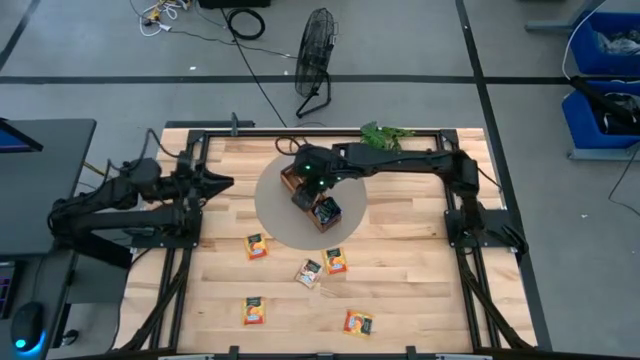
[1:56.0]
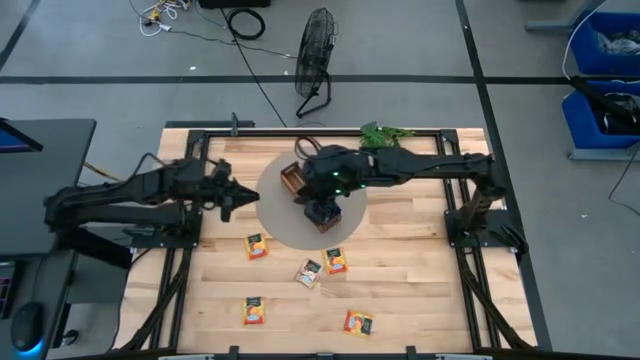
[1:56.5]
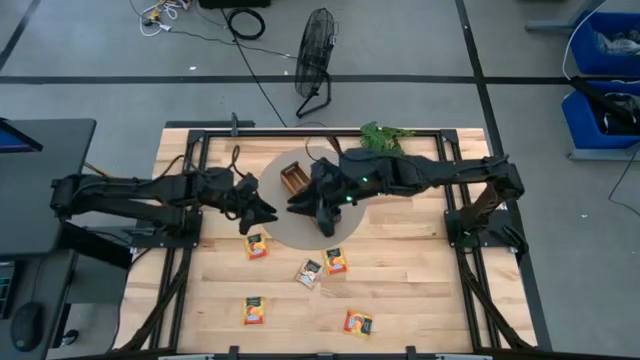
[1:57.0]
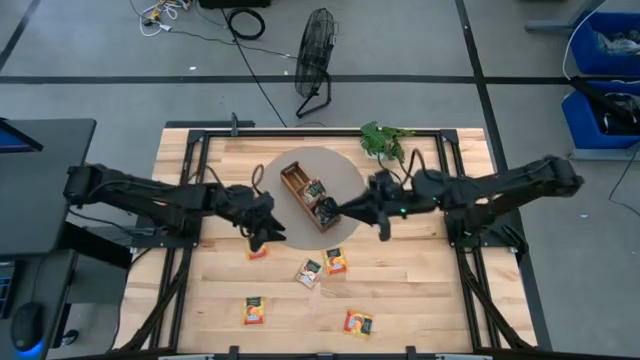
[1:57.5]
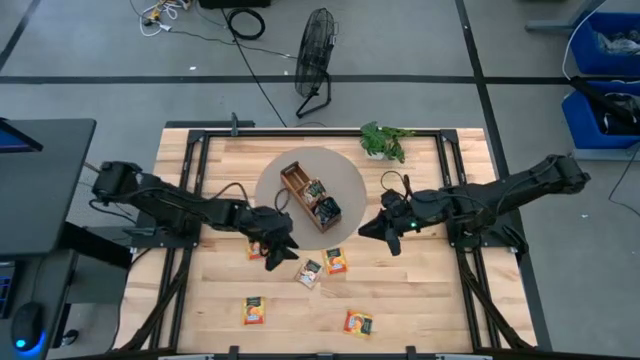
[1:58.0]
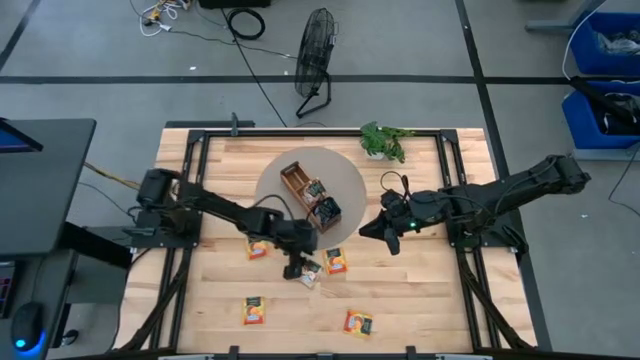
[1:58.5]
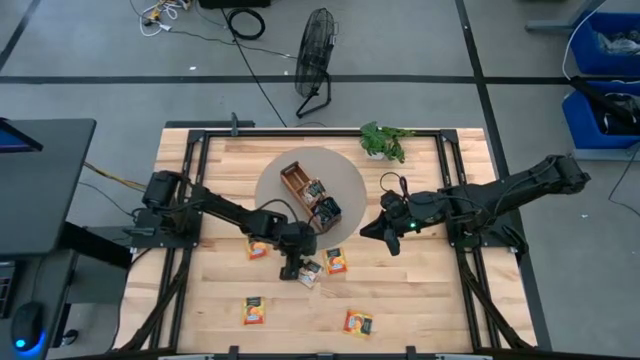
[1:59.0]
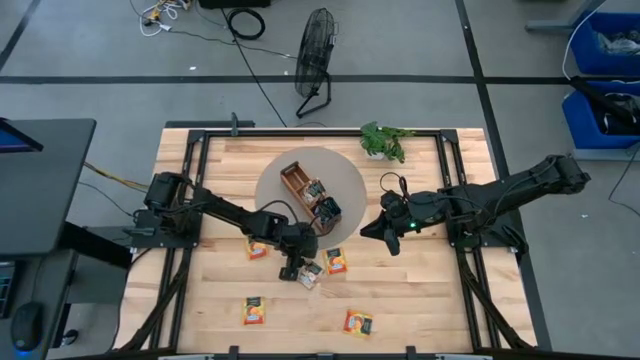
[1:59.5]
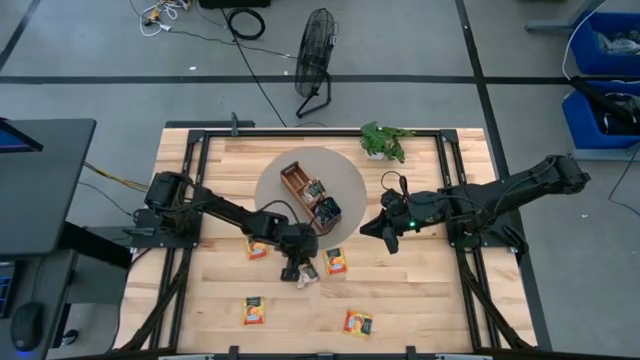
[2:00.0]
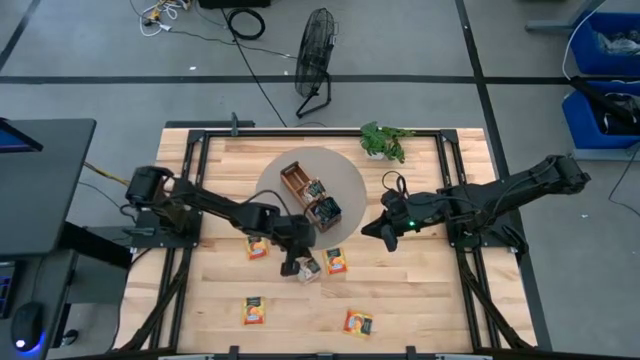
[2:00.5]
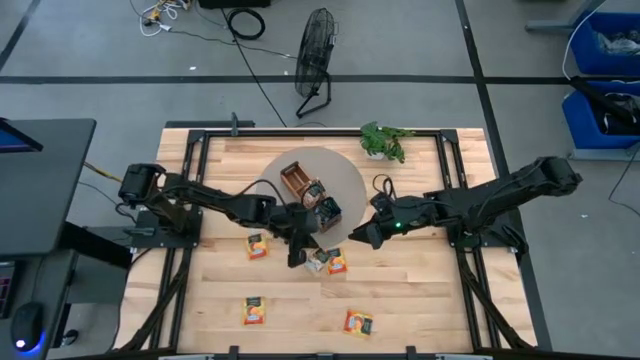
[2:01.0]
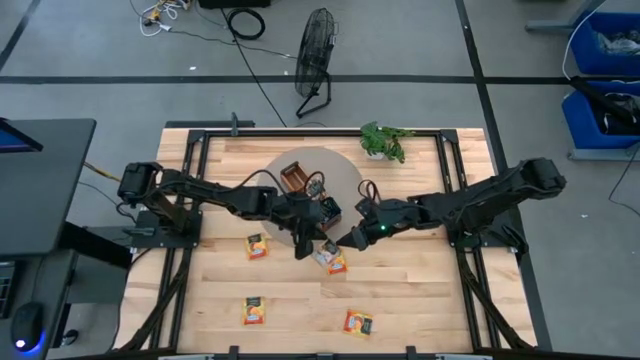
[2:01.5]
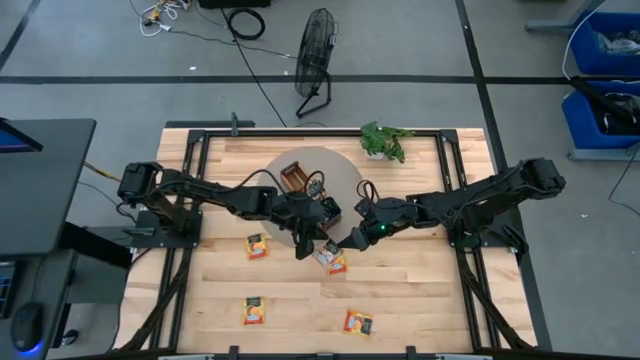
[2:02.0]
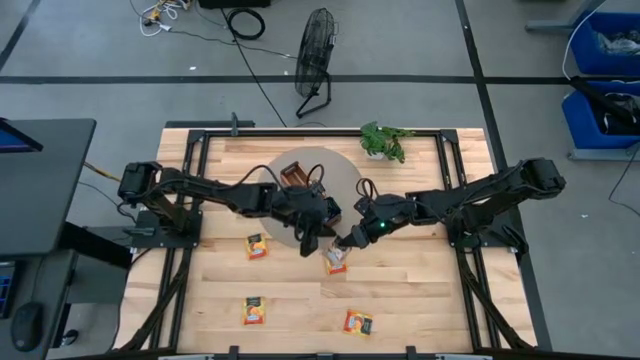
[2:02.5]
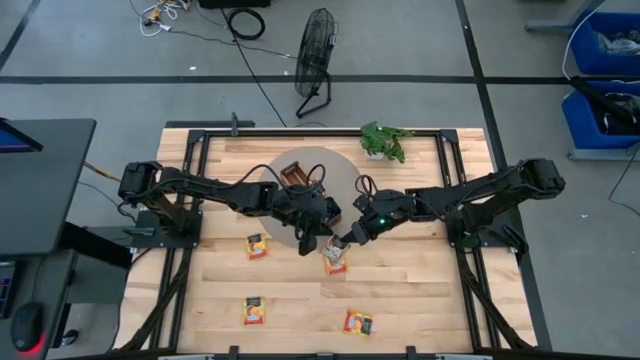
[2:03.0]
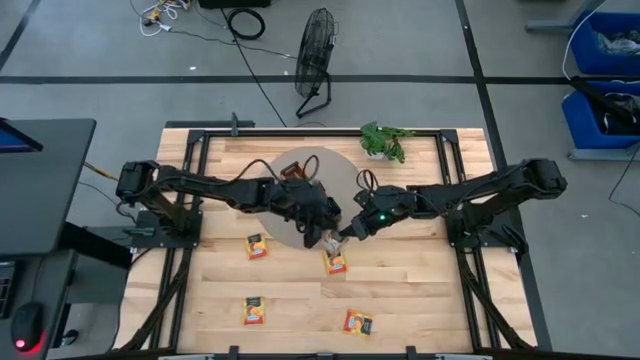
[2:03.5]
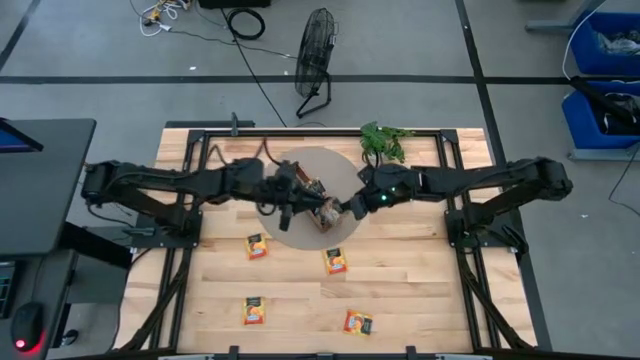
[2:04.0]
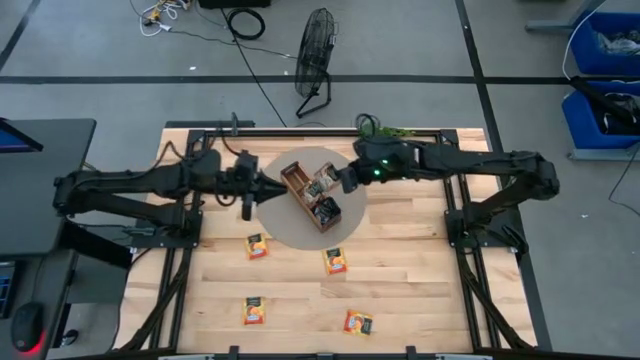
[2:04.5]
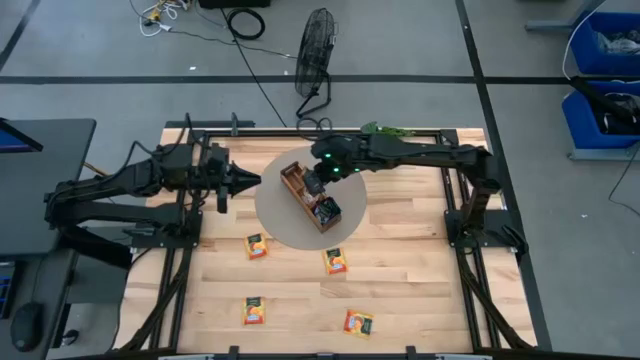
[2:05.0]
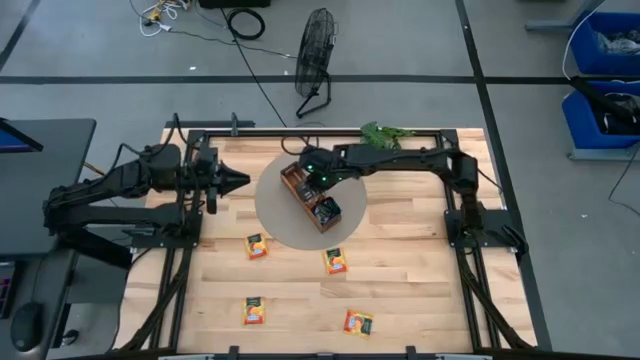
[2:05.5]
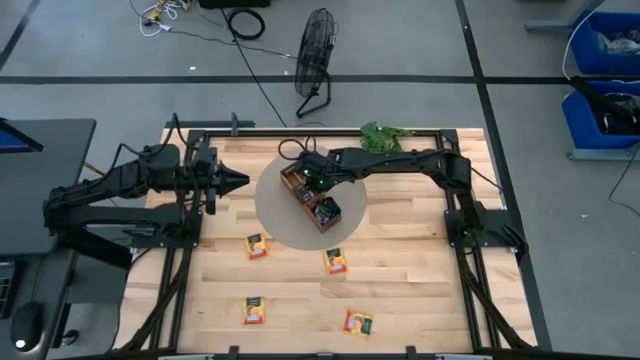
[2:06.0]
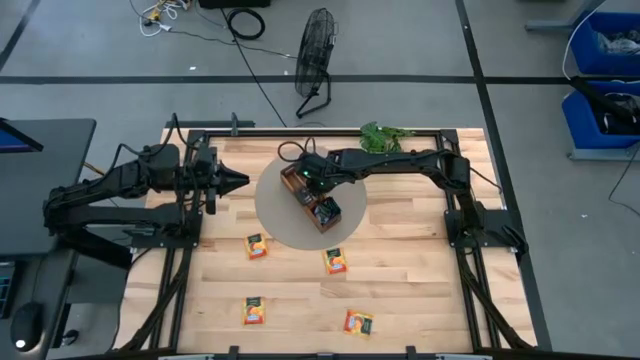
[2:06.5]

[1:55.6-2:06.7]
Task: Pick & Place Tea
Put the brown tea bag into the middle section of the wooden organizer

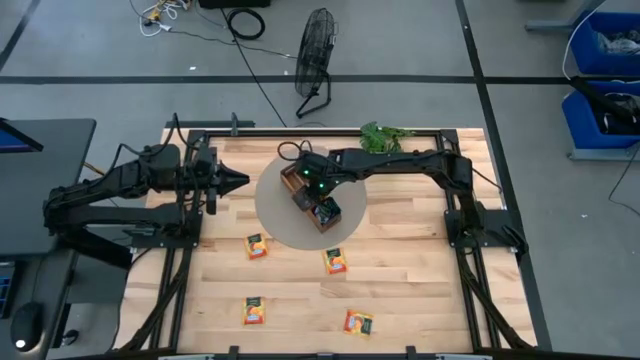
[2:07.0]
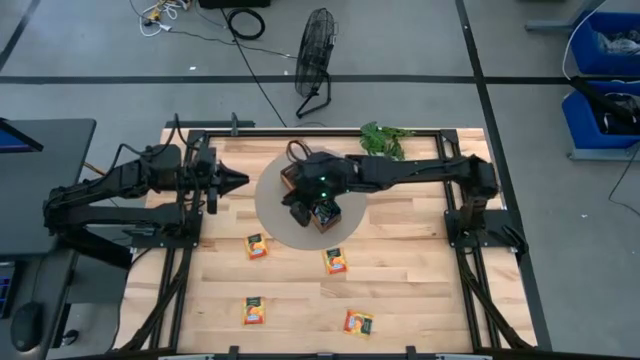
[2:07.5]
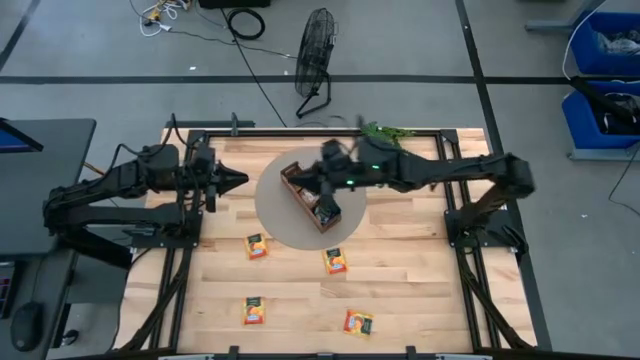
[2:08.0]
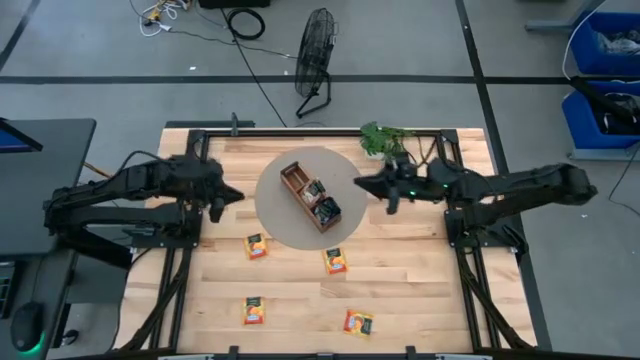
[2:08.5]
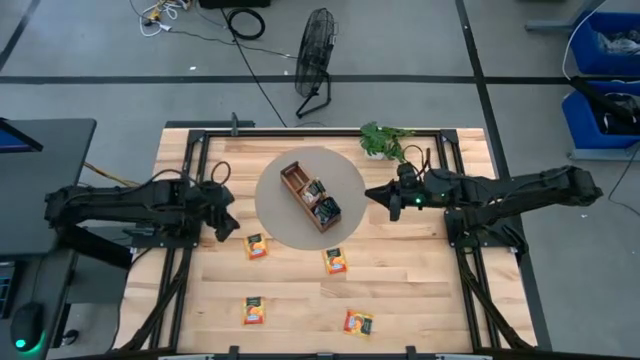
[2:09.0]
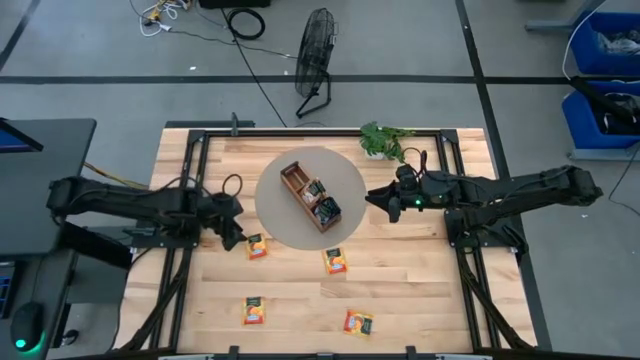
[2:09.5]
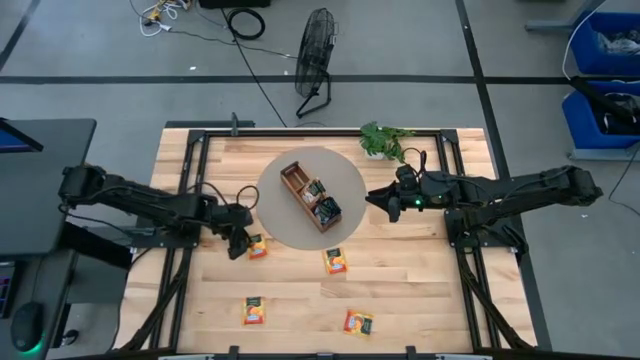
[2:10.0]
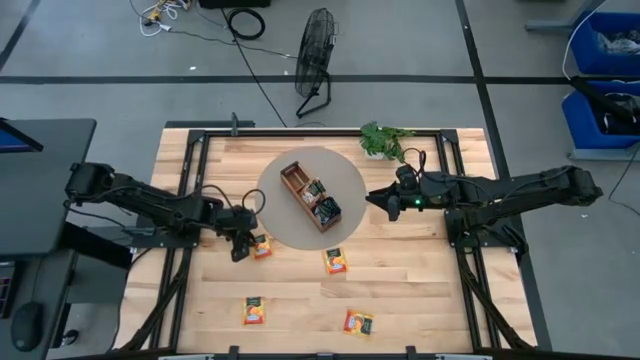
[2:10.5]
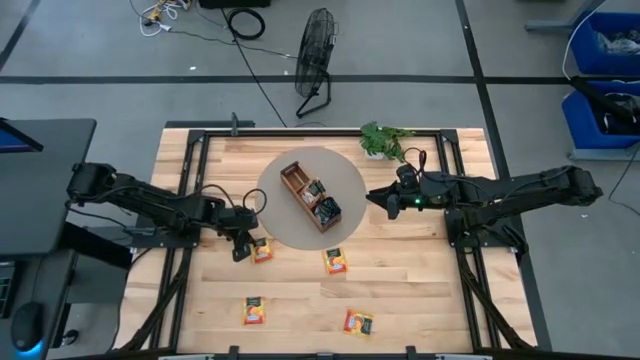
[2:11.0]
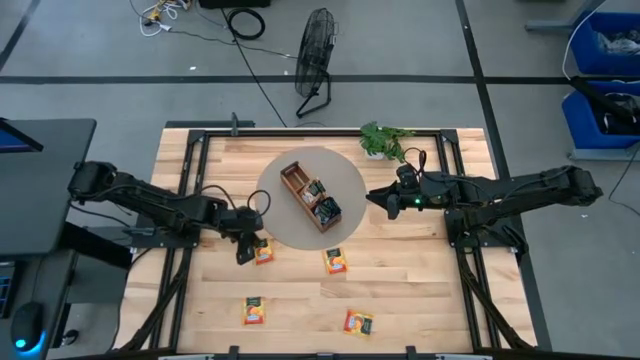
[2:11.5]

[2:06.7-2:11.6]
Put the yellow tea bag into the left section of the wooden organizer

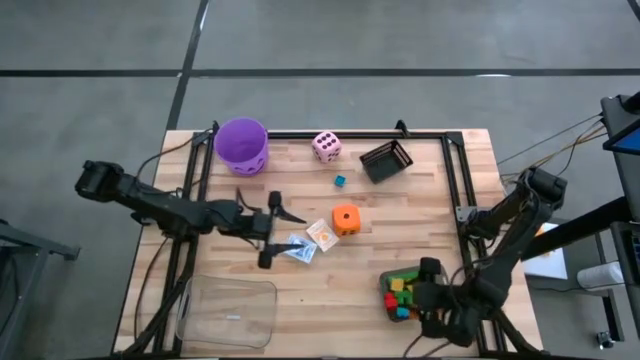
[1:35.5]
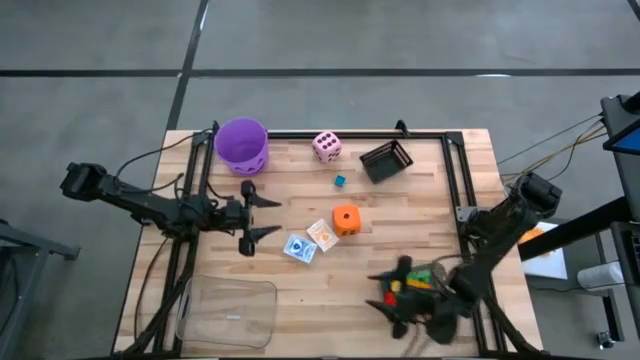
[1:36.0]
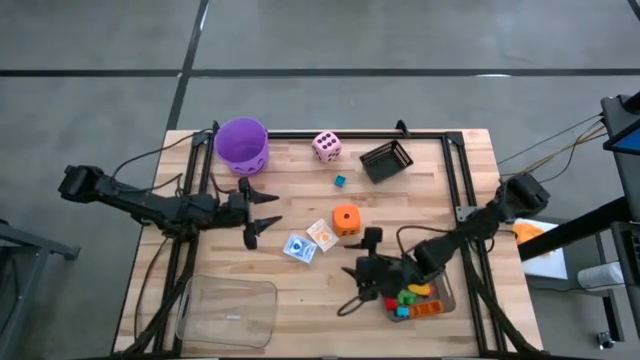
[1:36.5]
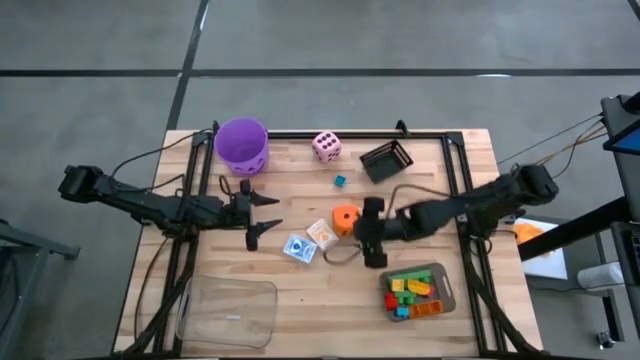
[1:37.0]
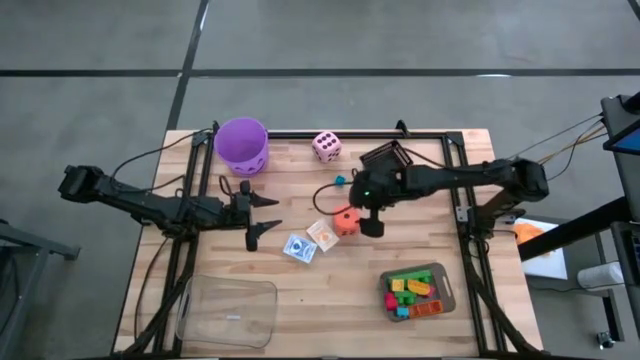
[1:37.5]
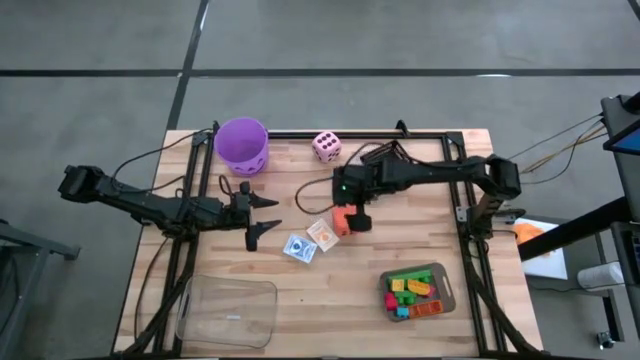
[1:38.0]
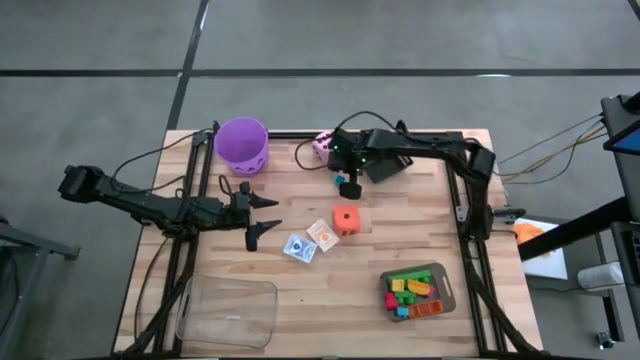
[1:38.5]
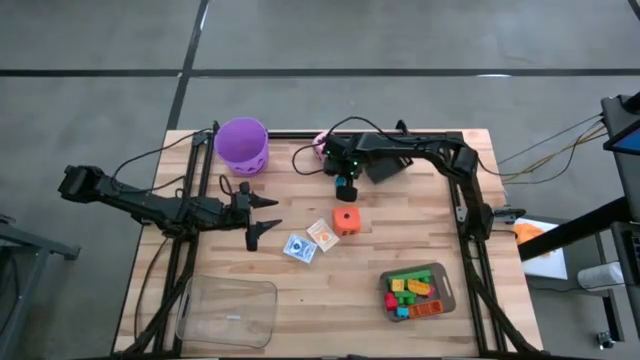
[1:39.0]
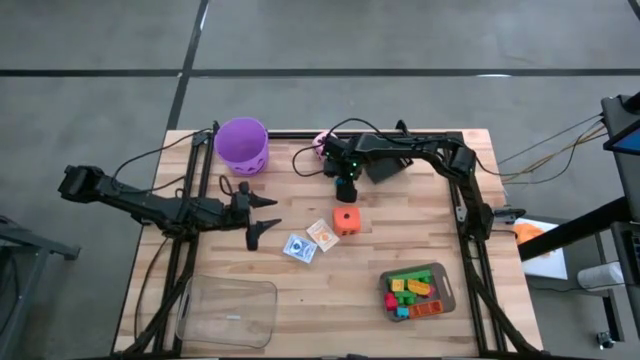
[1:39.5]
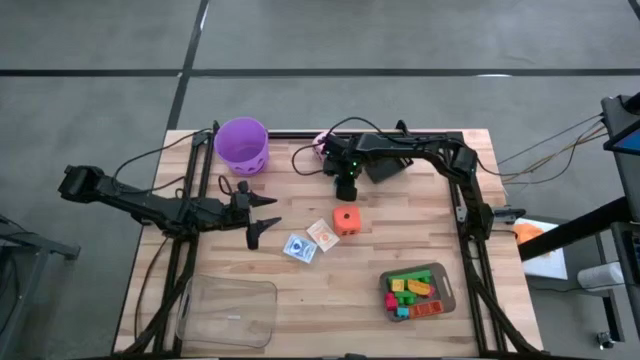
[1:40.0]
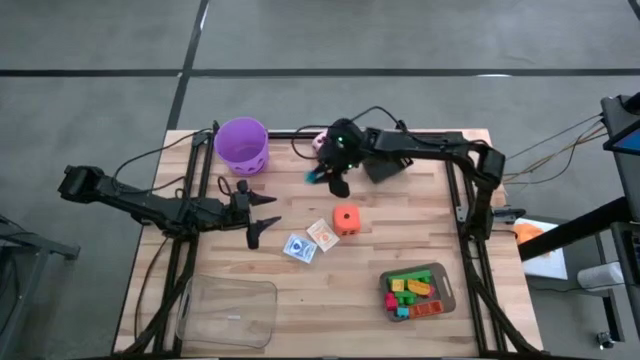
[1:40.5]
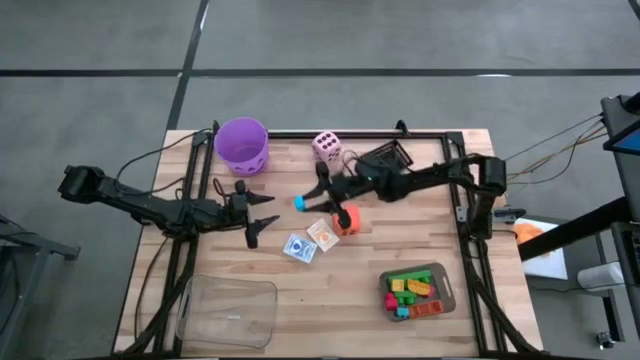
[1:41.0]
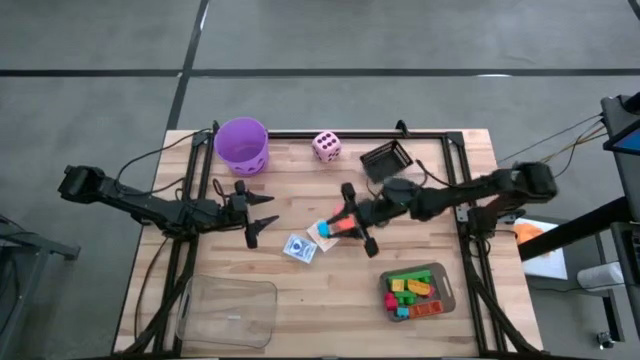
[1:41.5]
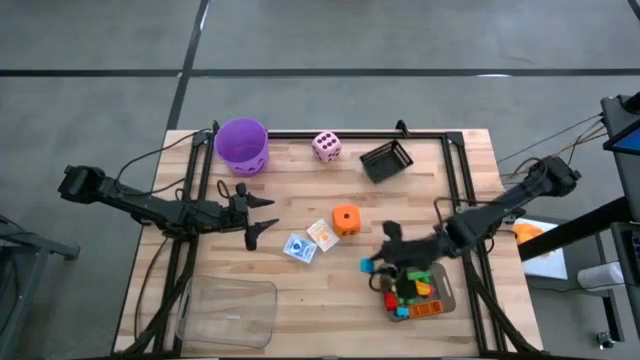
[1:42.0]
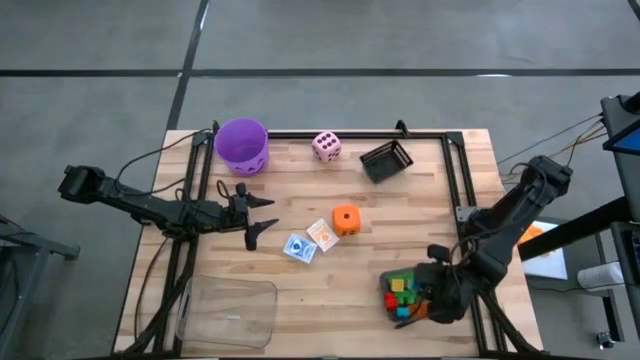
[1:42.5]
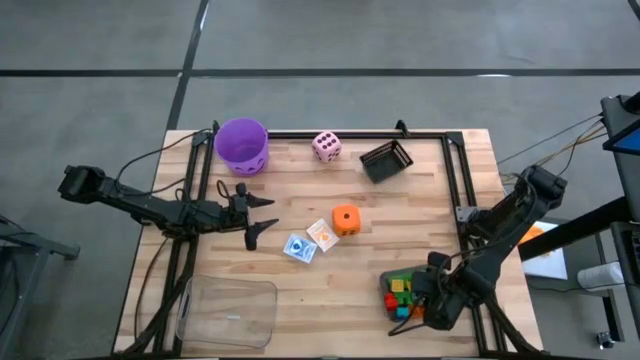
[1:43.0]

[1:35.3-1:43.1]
Task: Pick & Place Toys
Put the blue game piece into the black bin
